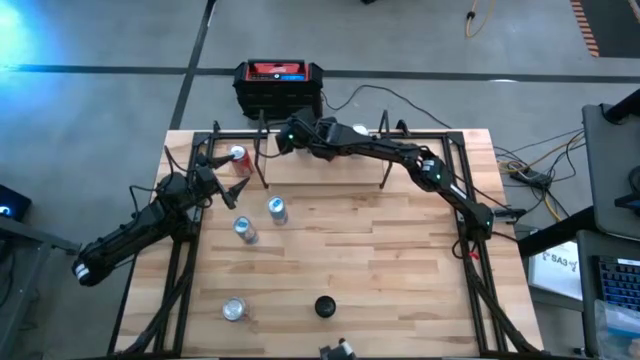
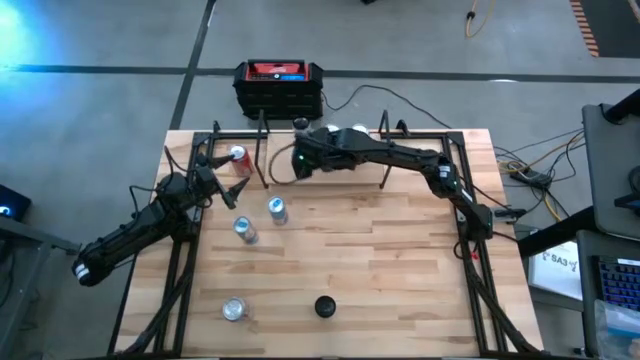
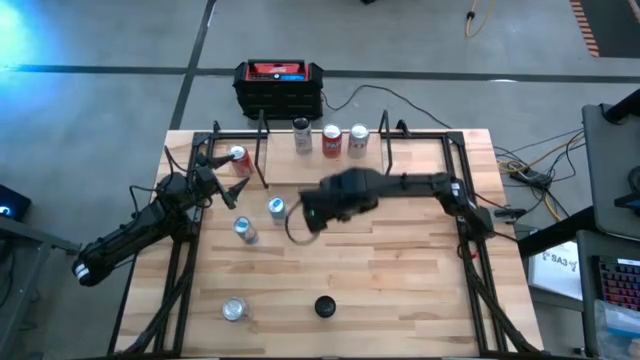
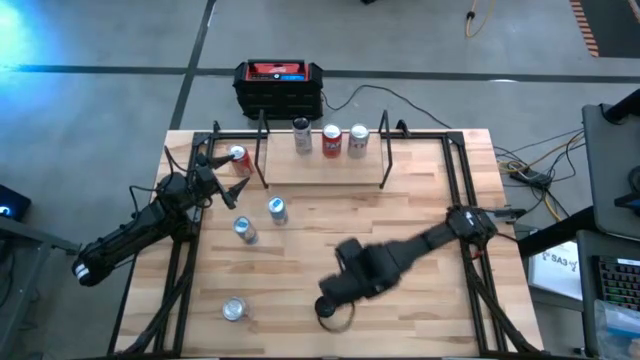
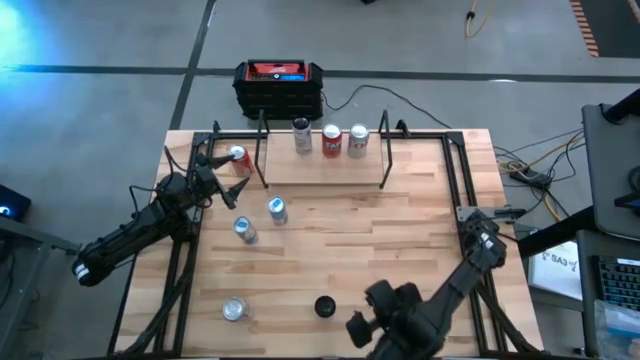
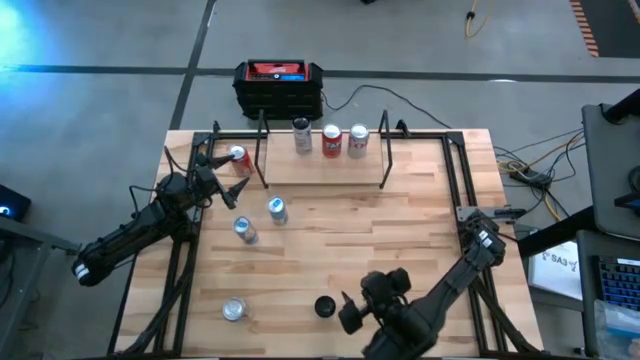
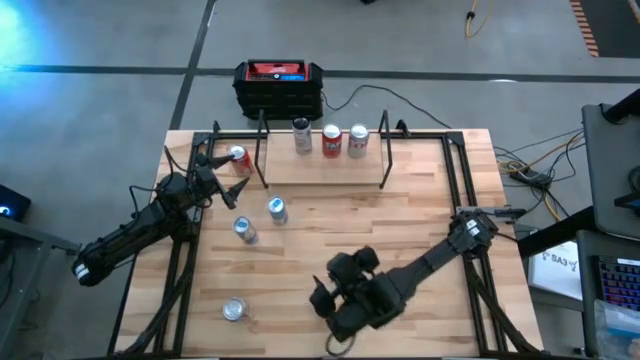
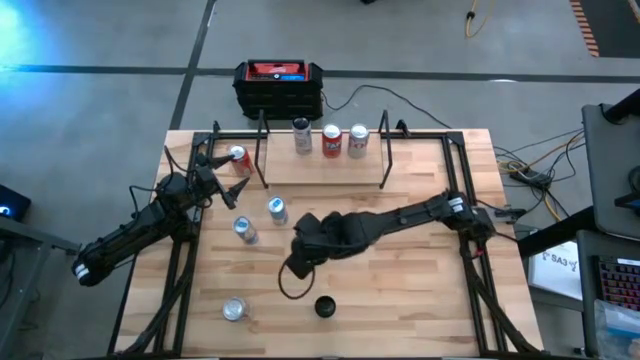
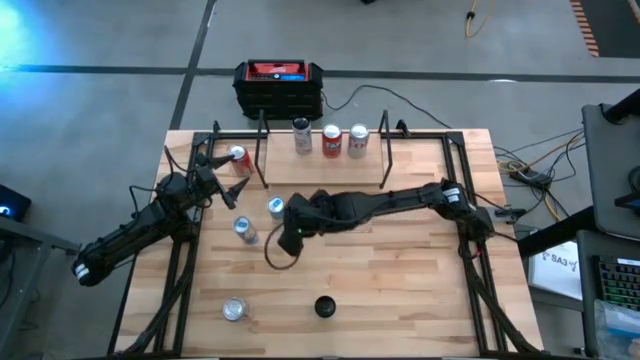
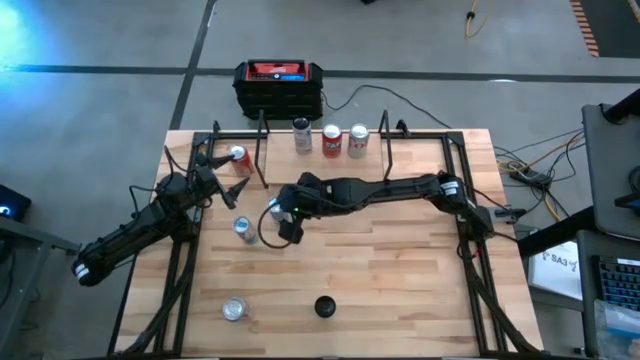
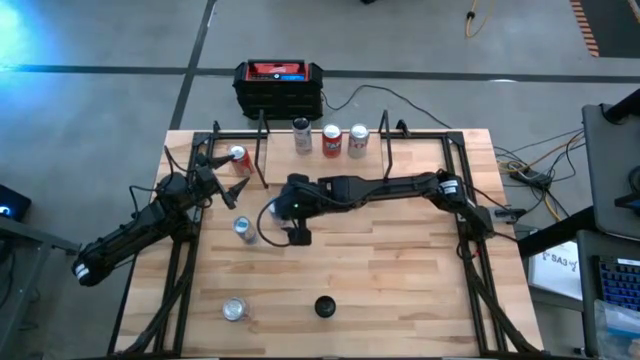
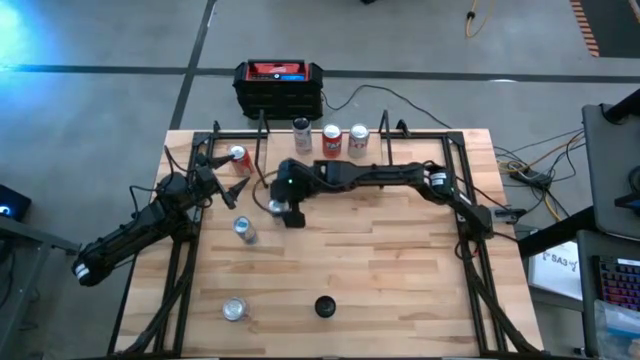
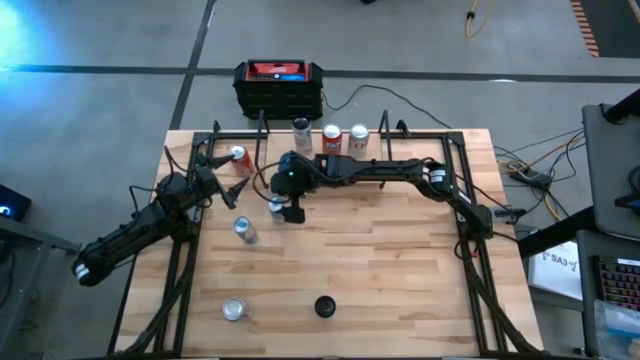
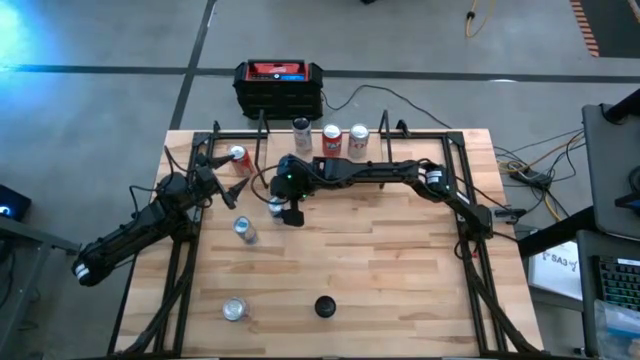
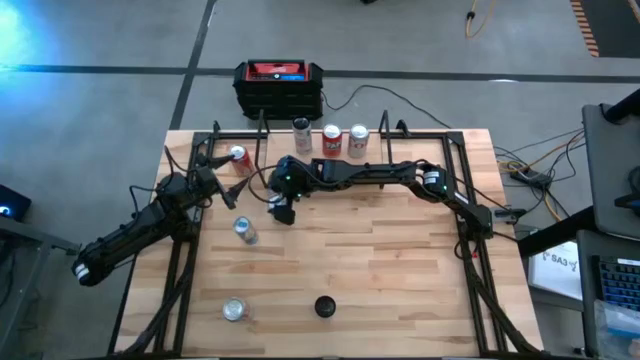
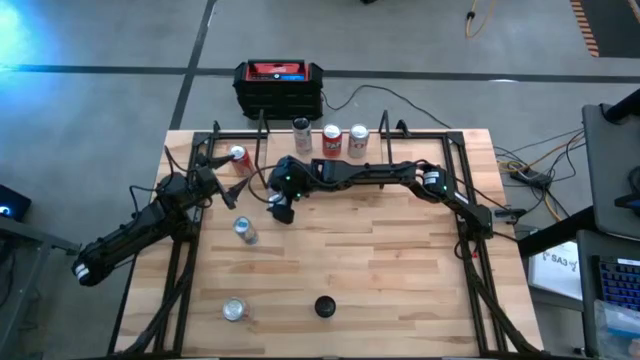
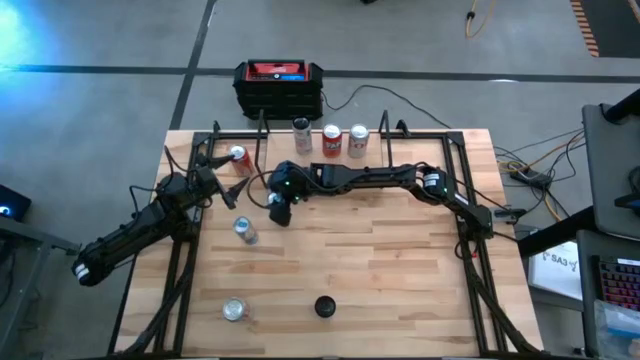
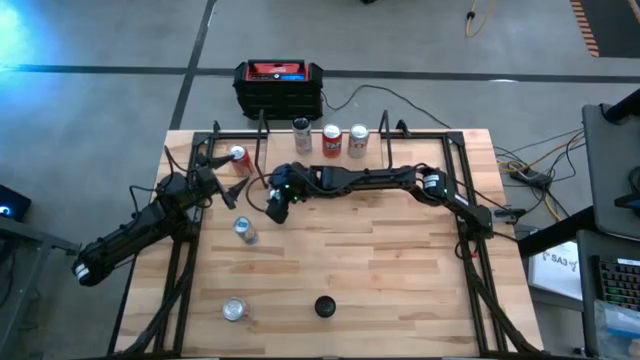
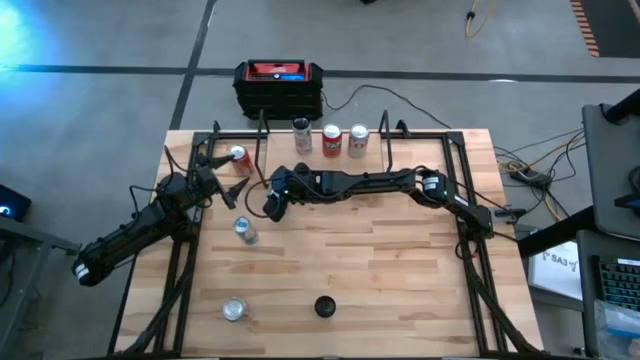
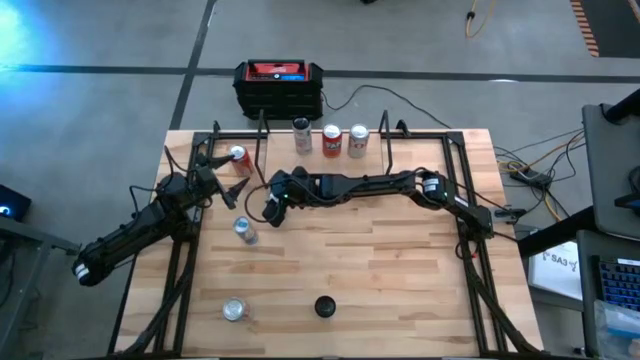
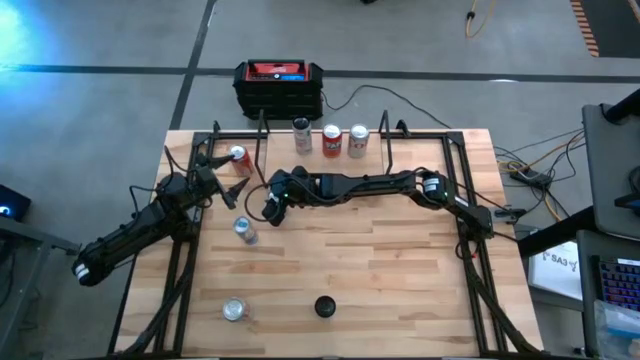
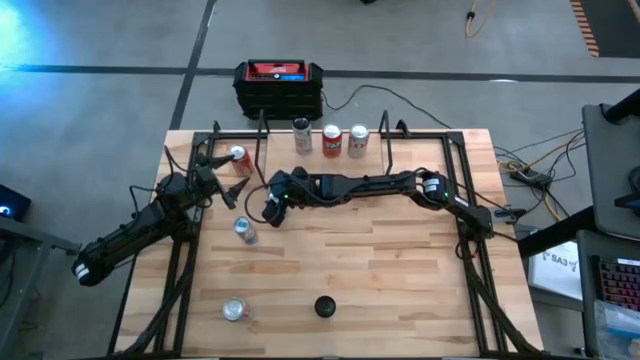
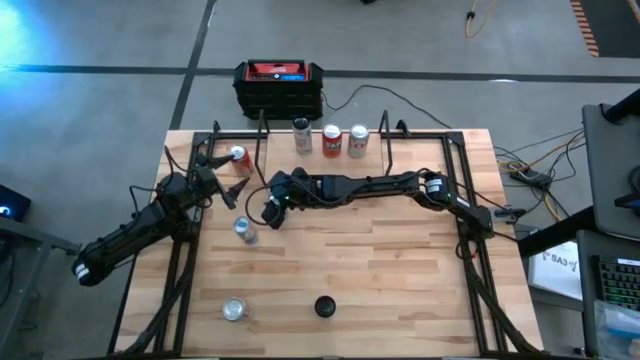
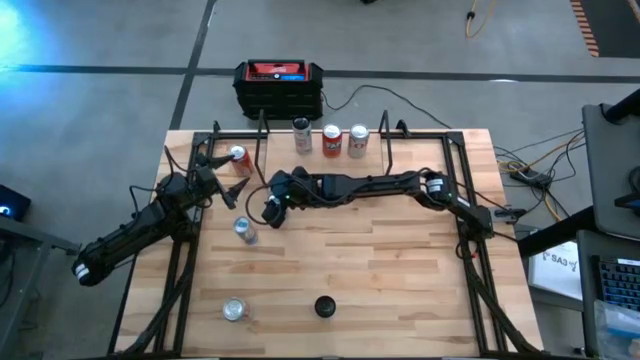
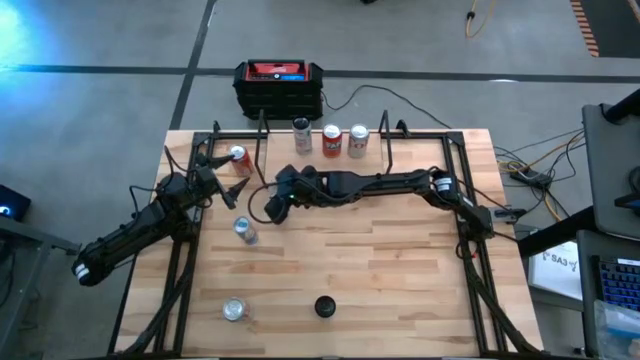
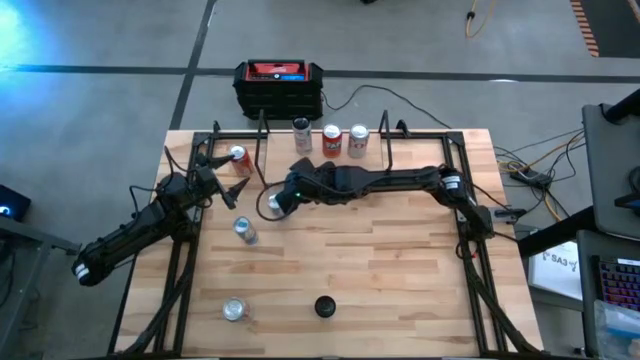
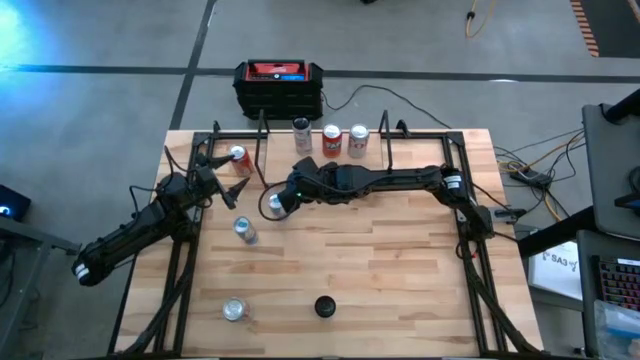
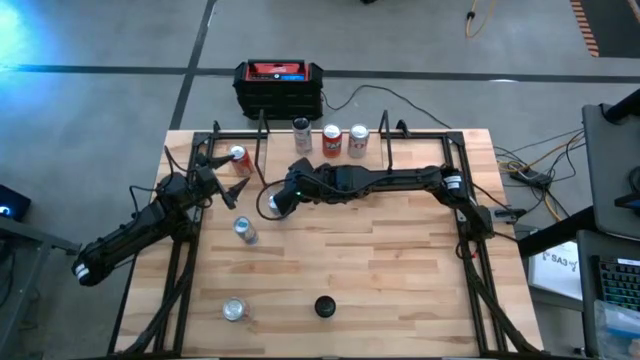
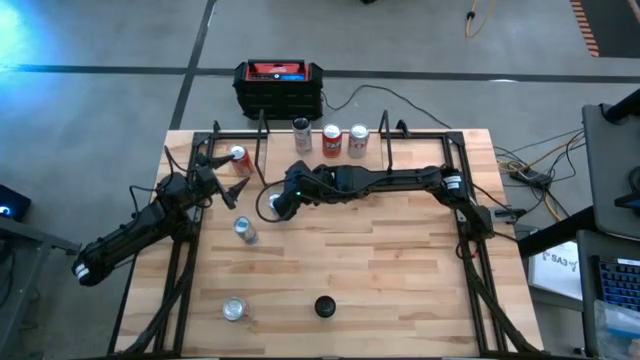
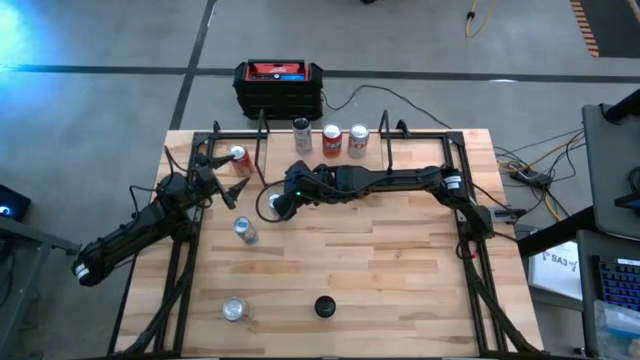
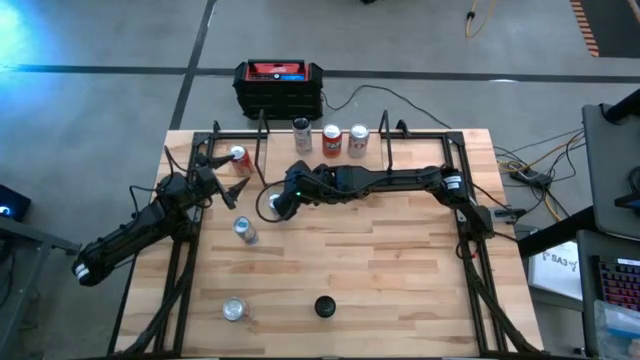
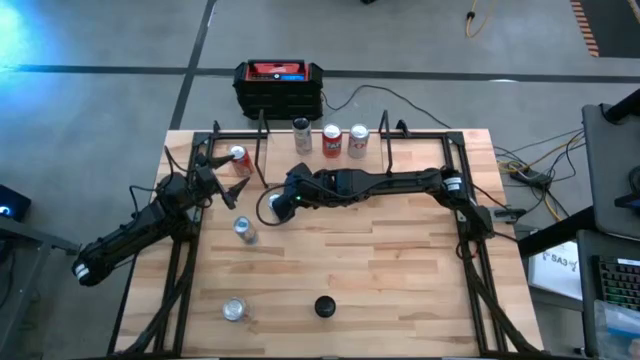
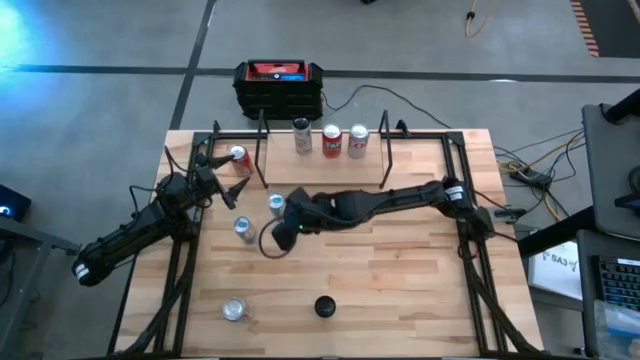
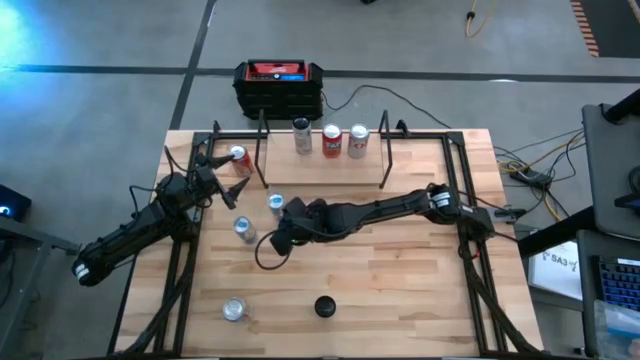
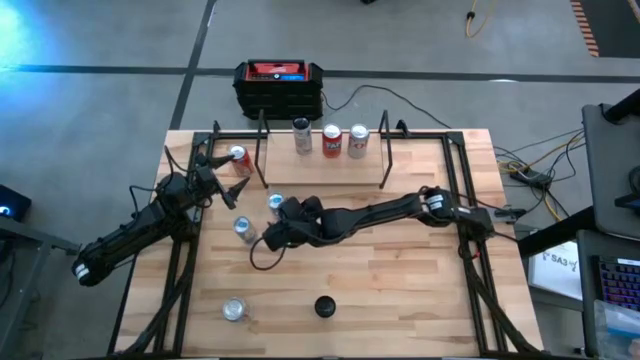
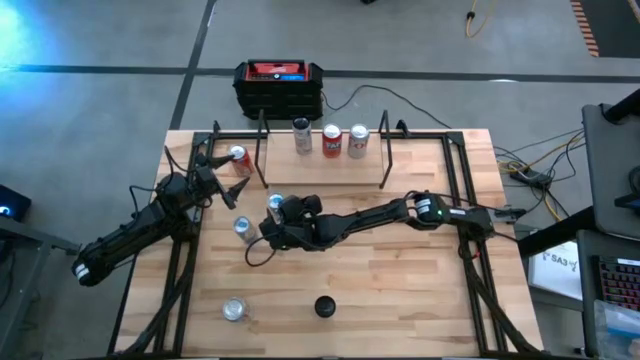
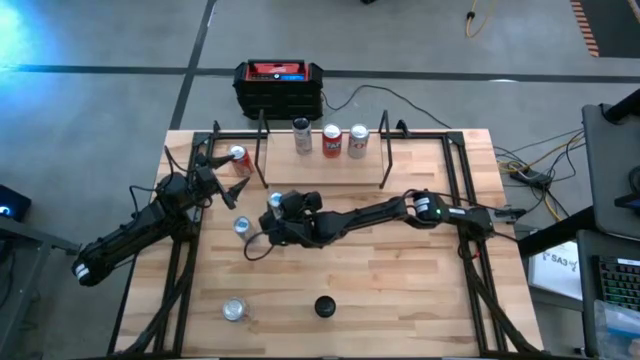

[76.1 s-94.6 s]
Task: Place canned beverage on shelf
Put the top blue soda can on the shelf

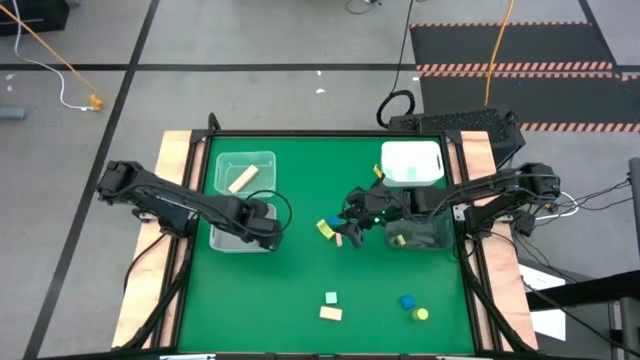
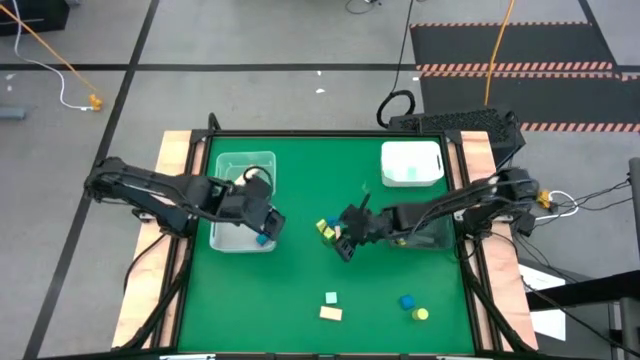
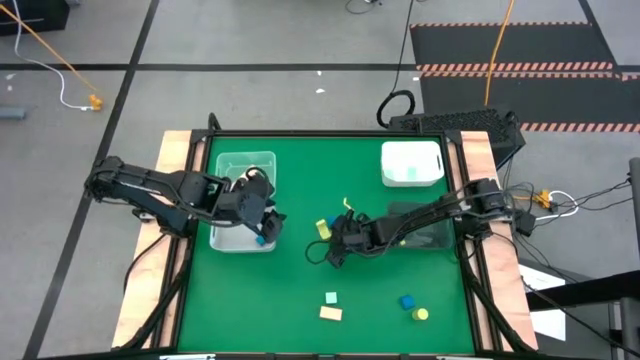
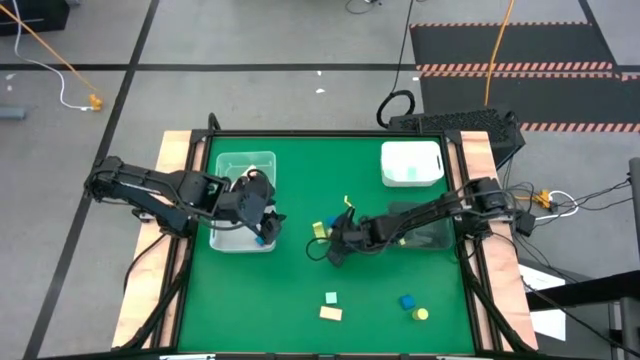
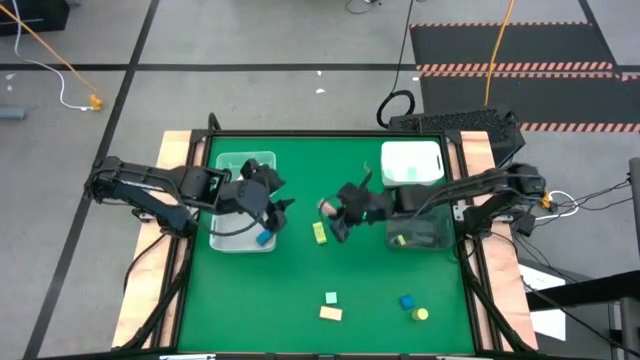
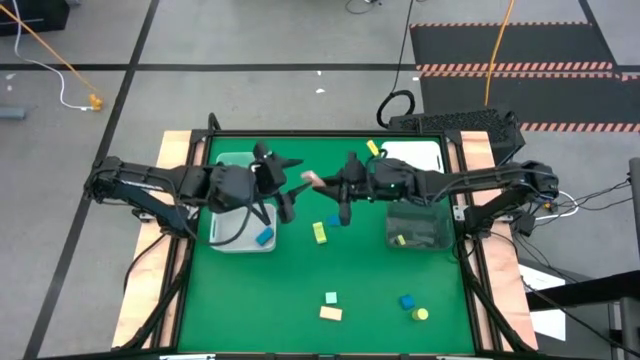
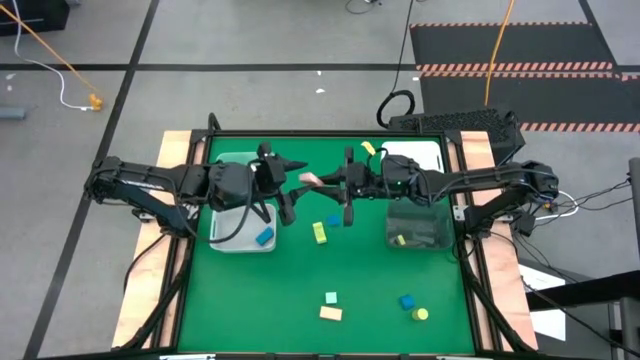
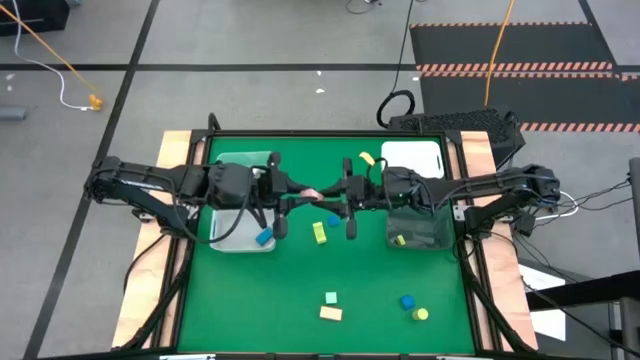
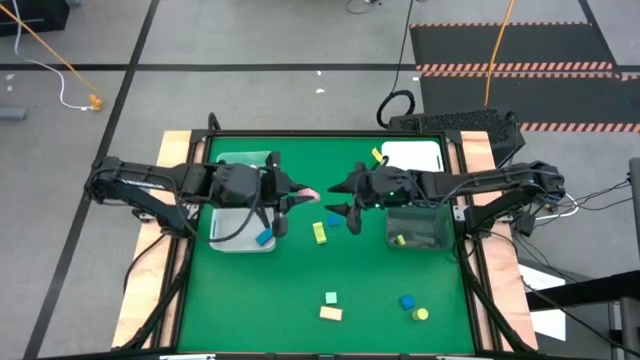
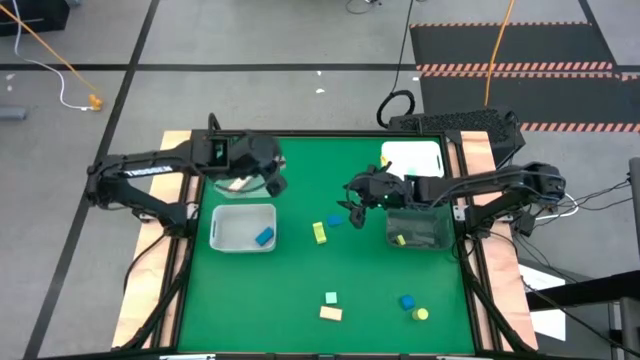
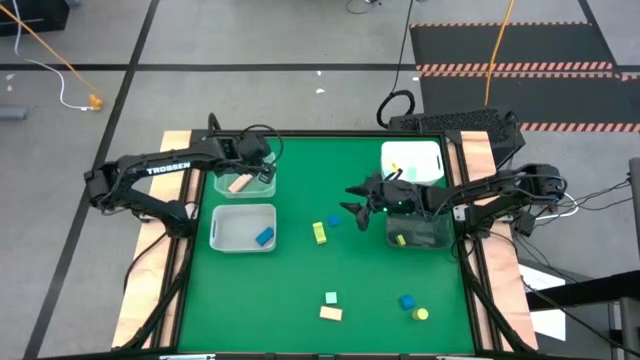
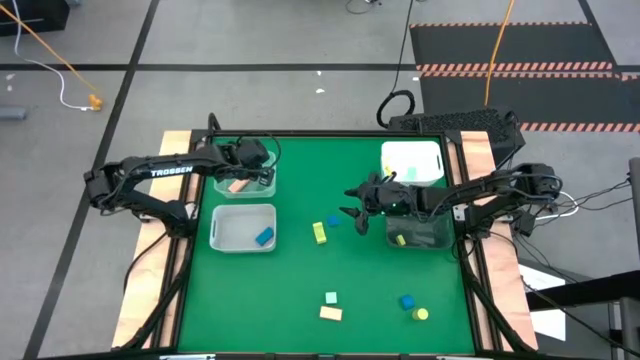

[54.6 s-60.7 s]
Task: Sort & place blocks by color
Put the top brown block into the transparent bin
